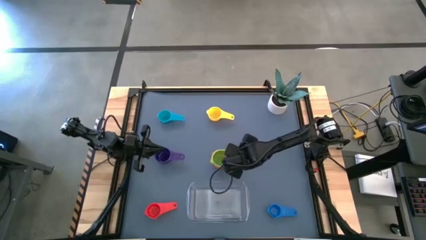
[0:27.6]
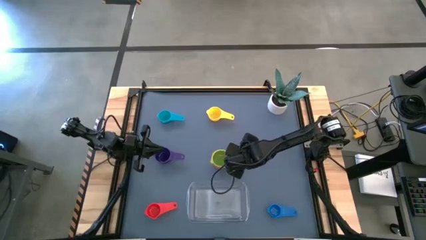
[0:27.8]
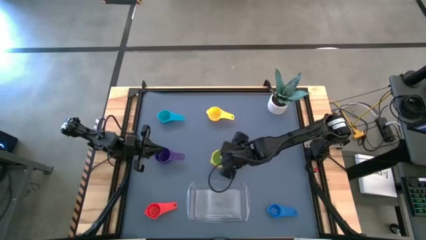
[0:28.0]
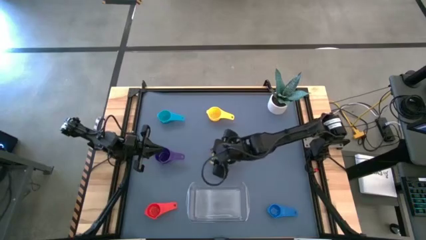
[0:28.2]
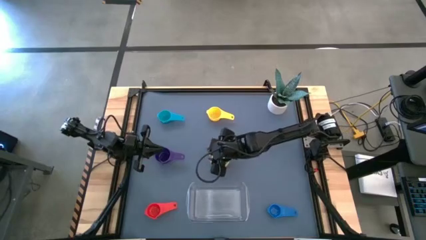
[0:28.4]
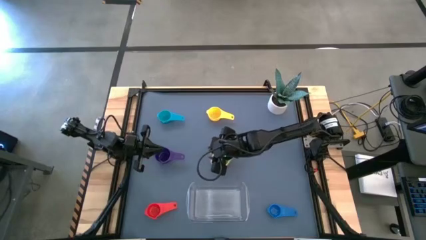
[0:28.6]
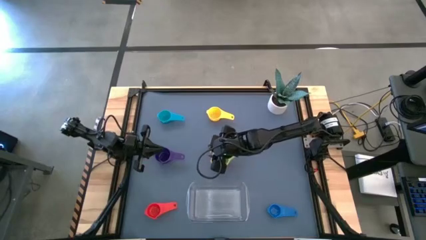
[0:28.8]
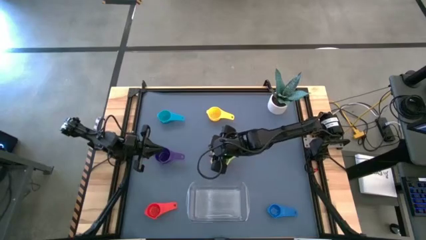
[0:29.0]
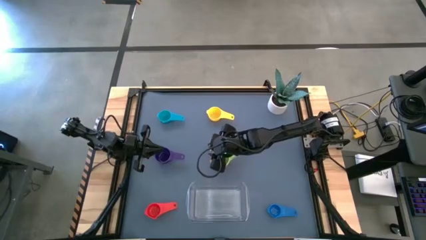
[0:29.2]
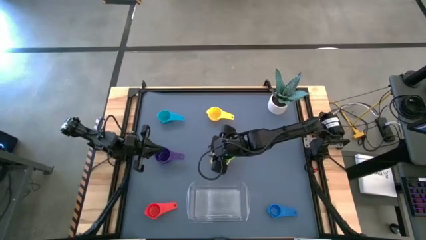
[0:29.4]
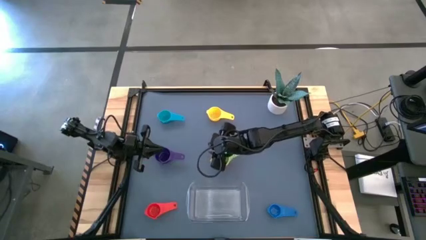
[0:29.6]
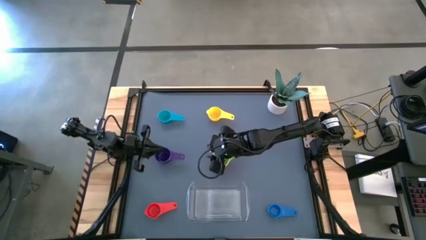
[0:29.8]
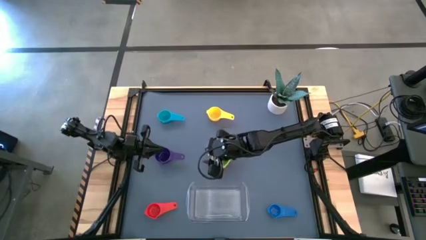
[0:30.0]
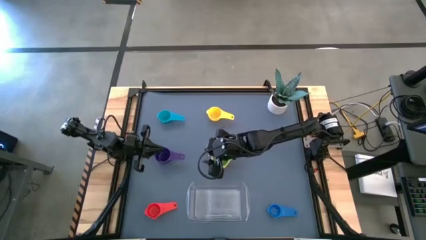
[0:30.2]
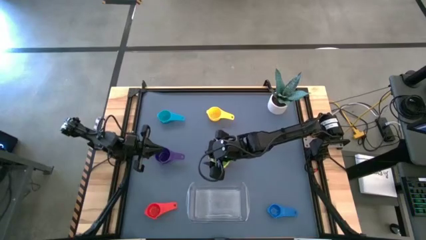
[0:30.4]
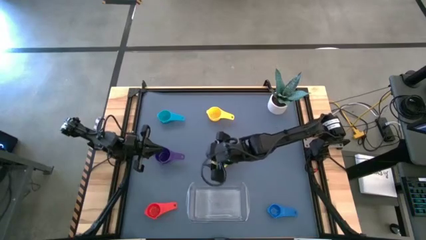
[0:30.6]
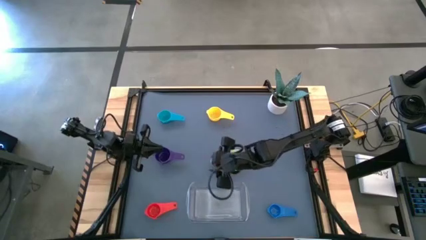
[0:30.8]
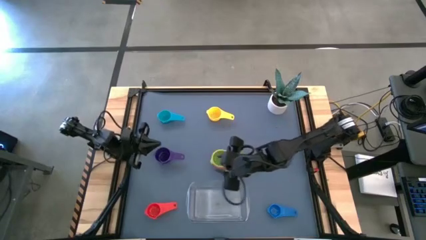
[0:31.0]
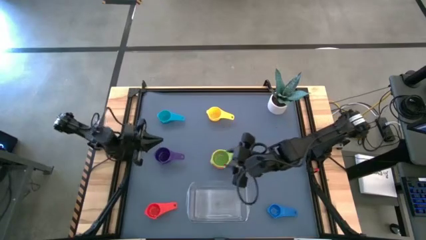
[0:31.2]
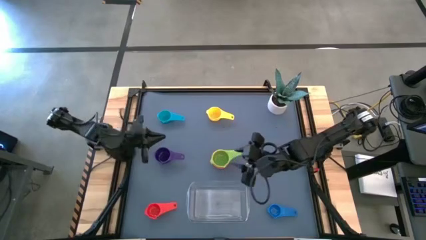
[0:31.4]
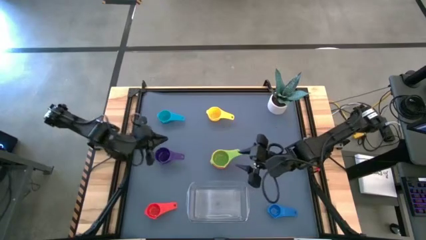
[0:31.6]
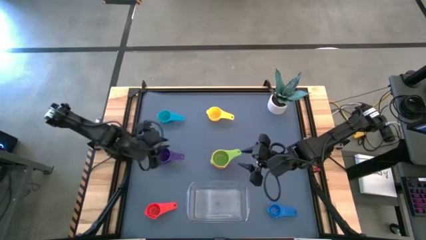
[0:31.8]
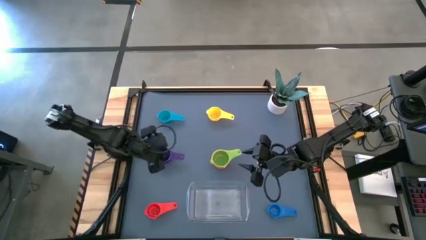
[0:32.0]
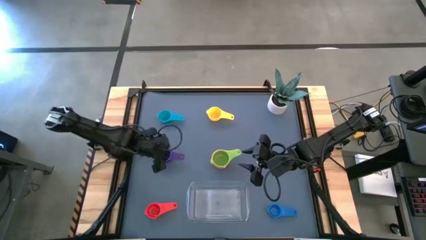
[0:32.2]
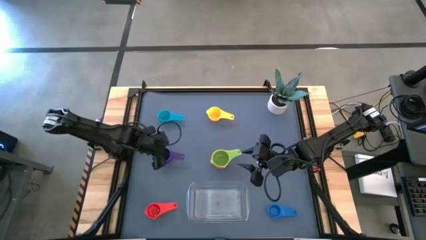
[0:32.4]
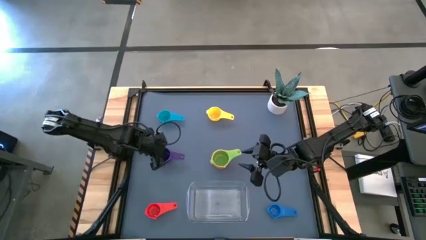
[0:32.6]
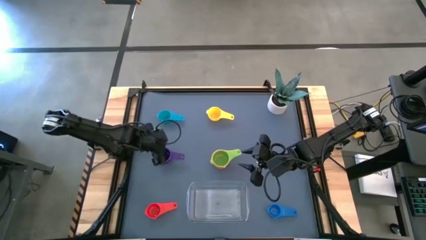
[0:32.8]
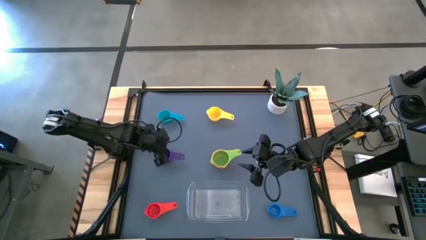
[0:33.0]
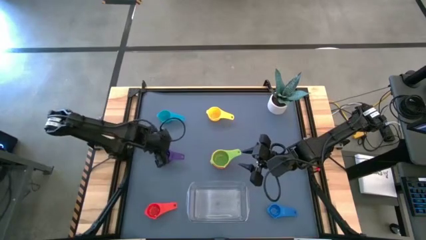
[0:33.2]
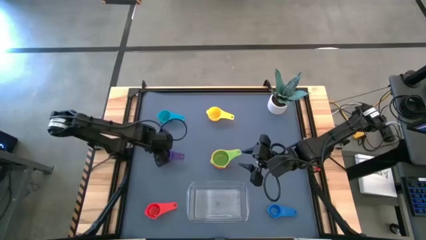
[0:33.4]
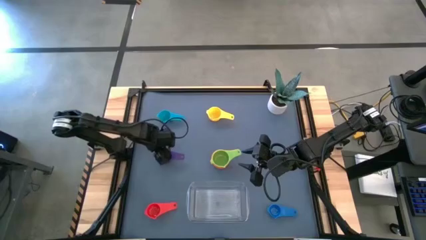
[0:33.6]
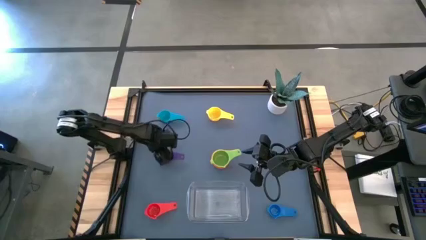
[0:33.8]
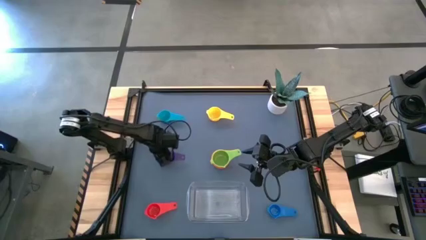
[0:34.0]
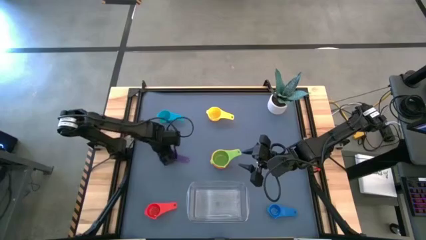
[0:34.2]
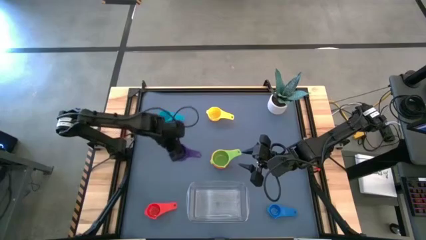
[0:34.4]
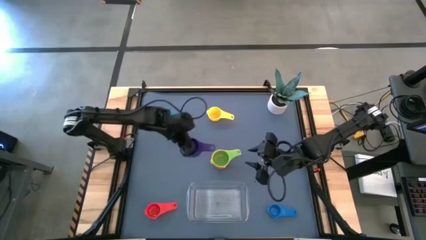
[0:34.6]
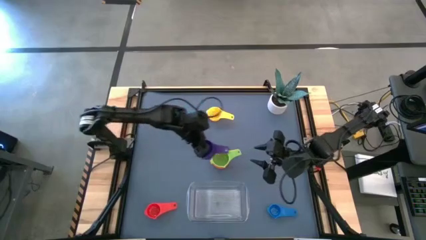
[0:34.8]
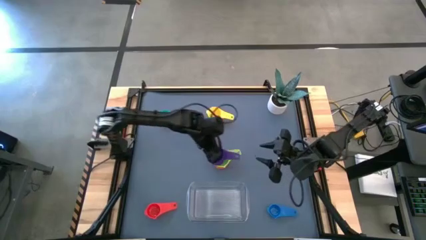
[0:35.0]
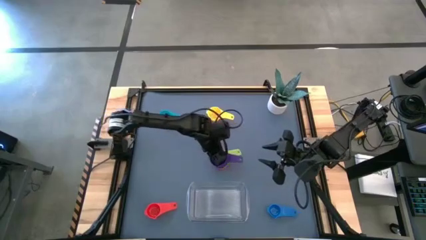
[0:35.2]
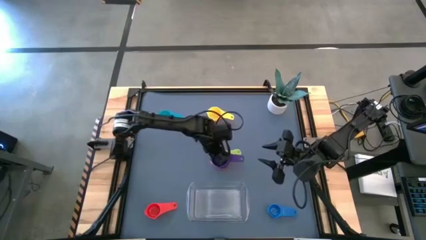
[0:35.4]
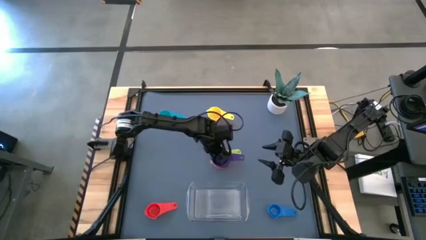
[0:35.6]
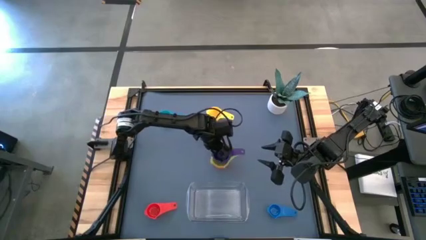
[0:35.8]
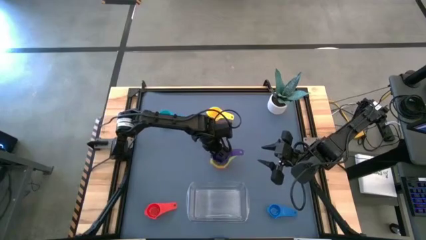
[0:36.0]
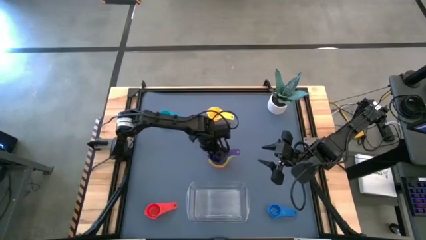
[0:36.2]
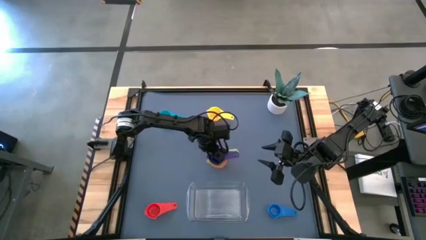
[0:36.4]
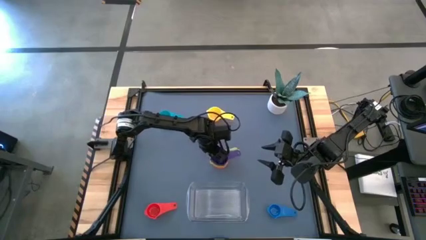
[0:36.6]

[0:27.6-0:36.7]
Task: Nest measuring cups in basket
Stack the violet measuring cup on the green measuring cup

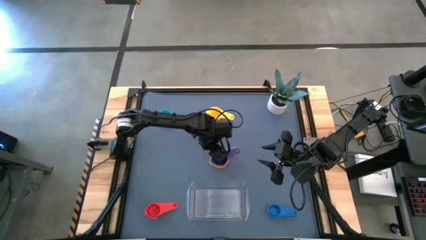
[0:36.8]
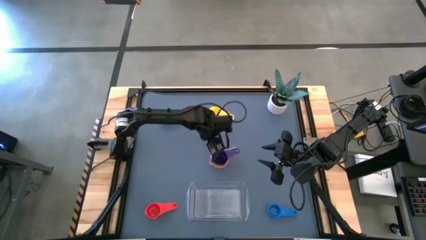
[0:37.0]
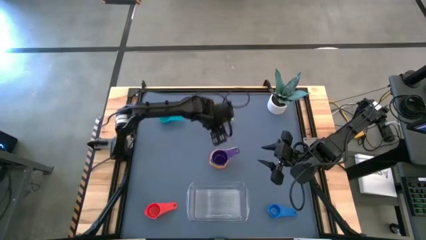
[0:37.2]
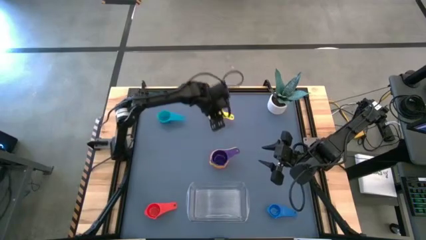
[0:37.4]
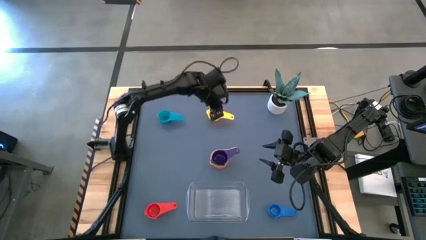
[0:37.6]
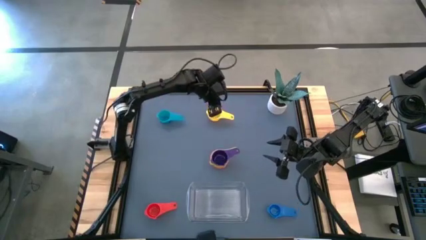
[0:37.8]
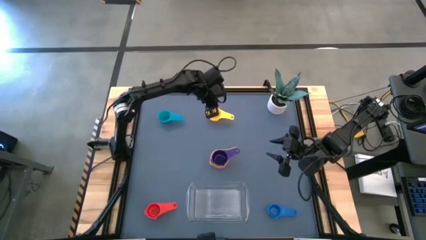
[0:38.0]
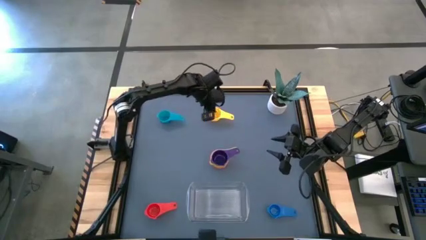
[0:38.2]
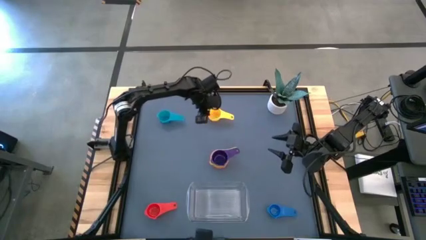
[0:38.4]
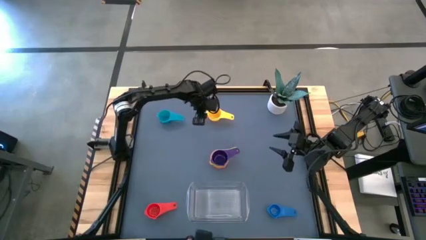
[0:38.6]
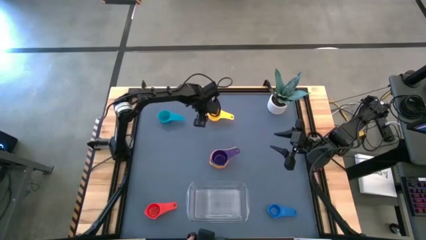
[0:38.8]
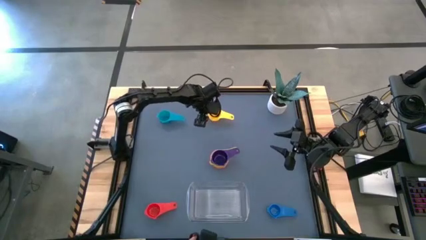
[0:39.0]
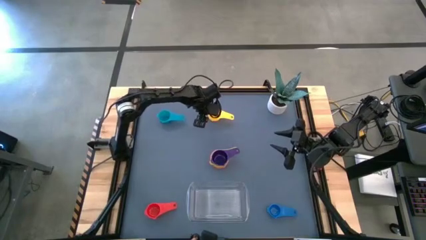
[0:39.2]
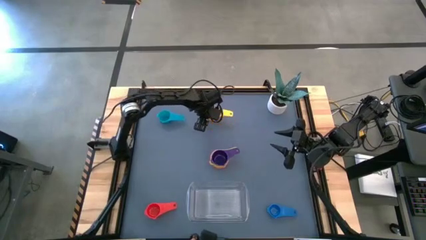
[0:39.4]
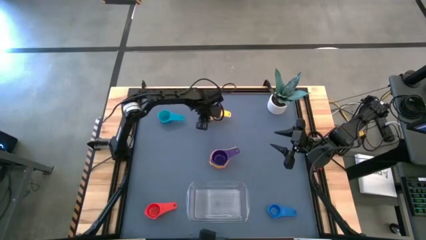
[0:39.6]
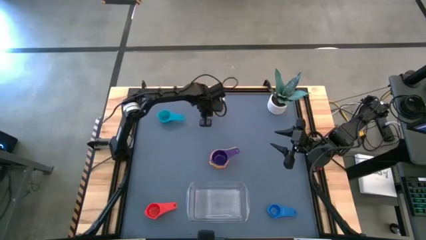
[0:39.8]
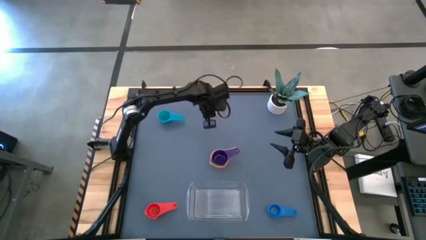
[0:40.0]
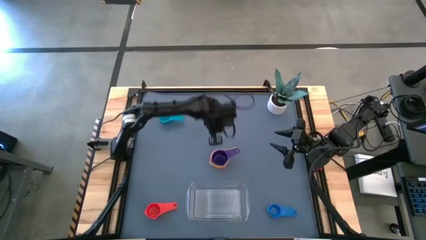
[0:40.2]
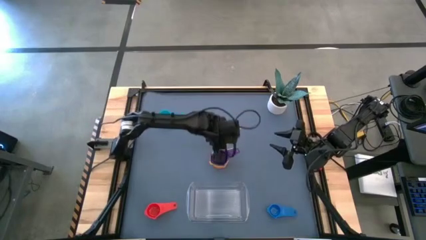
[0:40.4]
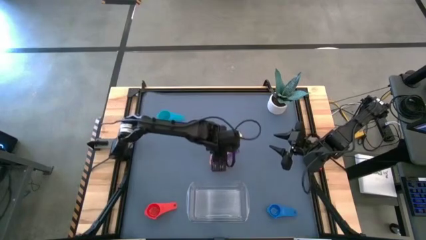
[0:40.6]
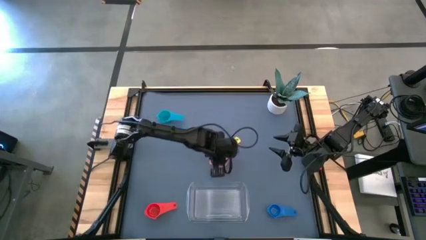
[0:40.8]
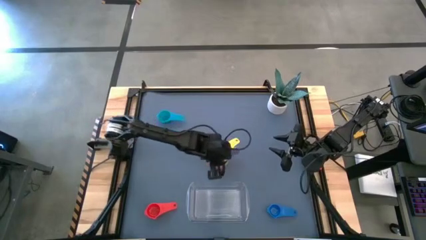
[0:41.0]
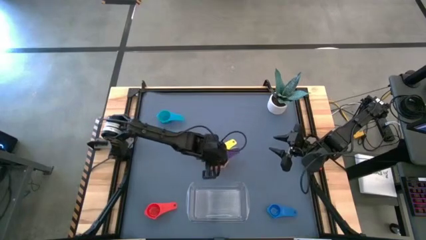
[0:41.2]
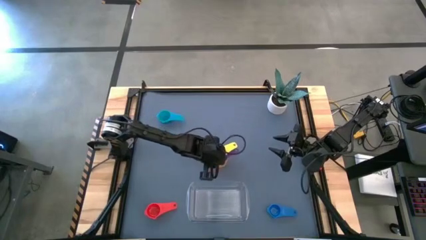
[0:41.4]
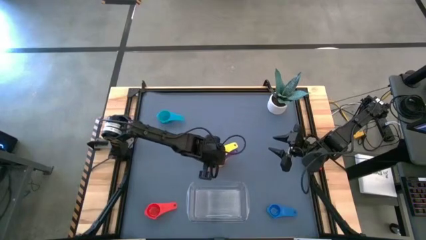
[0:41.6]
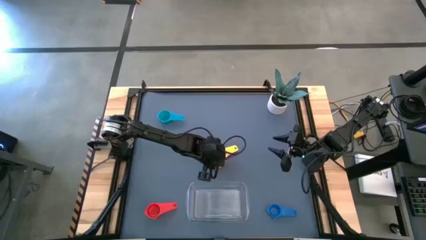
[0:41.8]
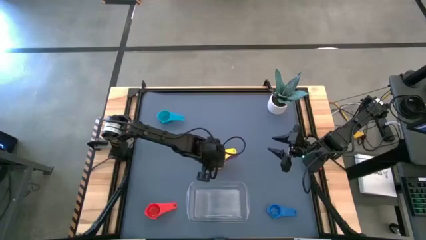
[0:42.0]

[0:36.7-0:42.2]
Stack the yellow measuring cup on the violet measuring cup

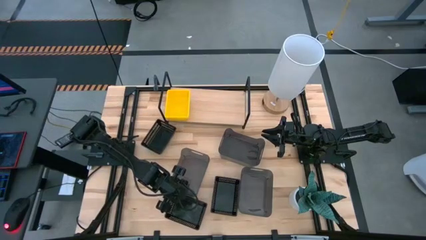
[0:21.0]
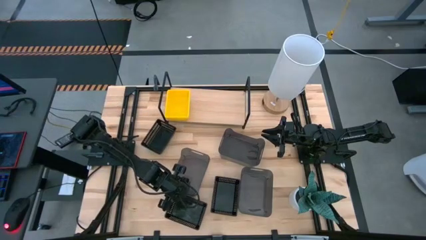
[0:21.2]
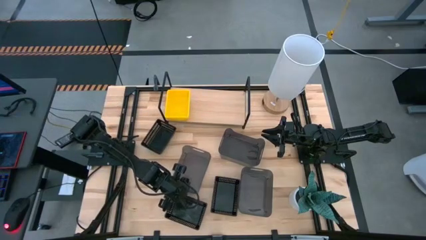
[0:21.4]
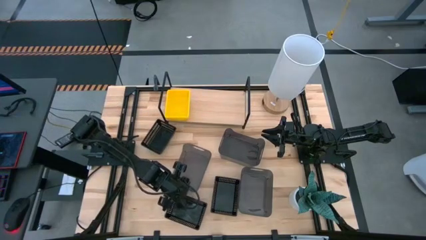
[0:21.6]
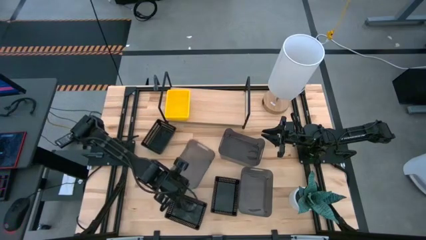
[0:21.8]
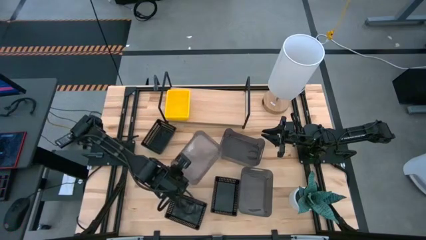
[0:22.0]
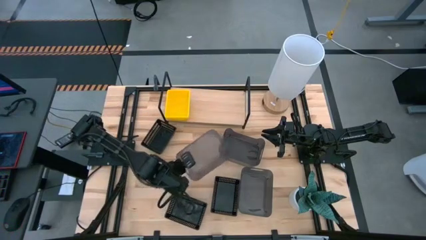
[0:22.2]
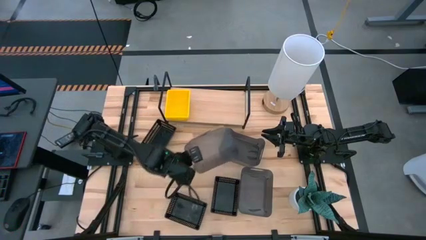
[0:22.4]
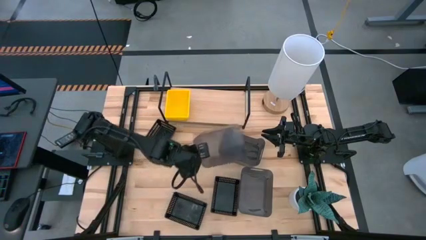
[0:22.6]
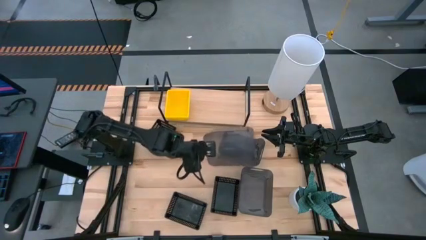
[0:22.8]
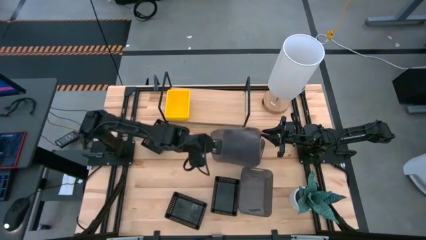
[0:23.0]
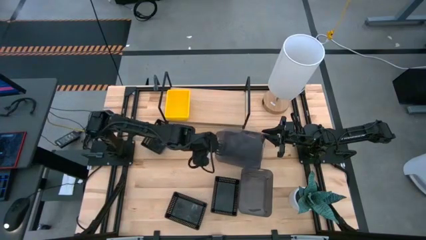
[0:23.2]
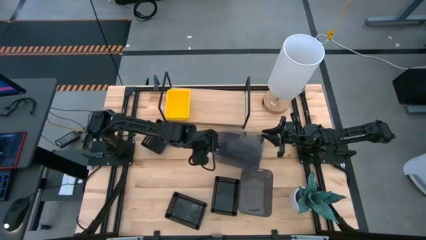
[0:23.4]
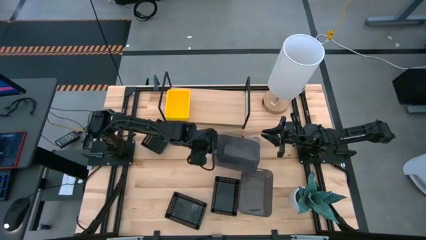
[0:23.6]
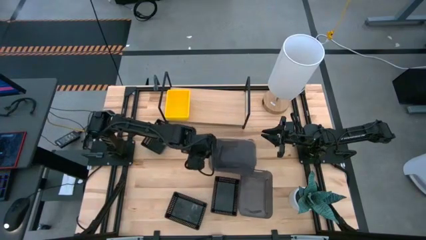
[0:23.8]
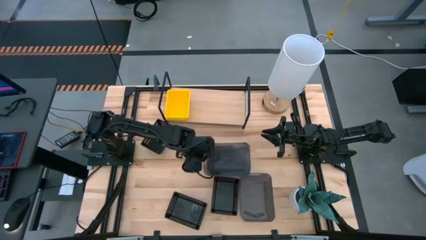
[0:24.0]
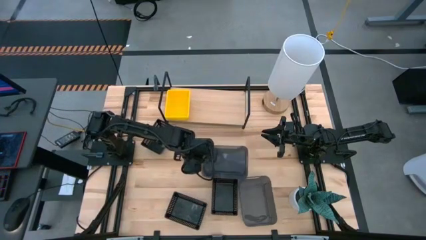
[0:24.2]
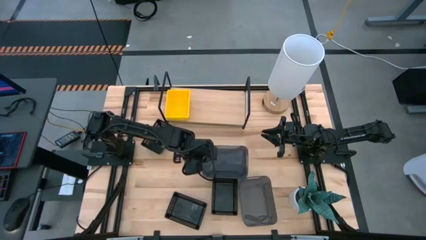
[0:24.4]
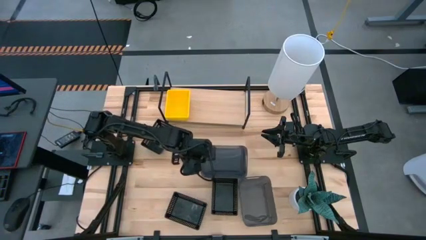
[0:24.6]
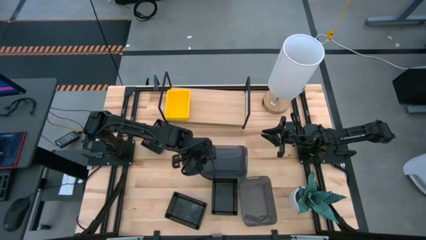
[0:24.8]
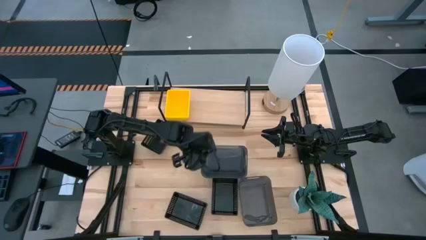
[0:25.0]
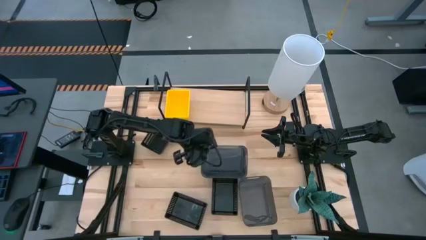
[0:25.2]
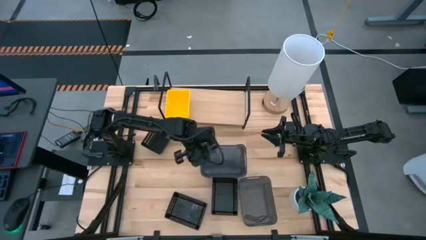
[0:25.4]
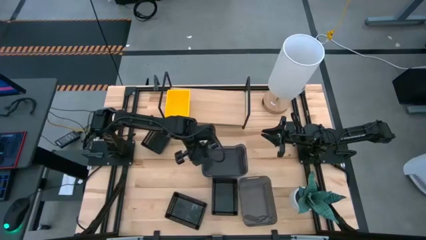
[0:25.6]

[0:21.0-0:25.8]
Task: Stack baskets on shelf by color
Stack the bottom left light black bin on the top light black bin
